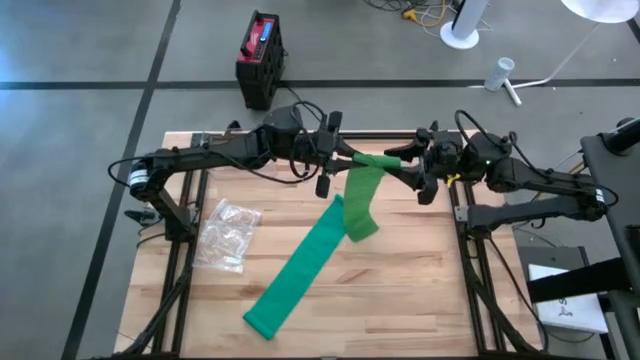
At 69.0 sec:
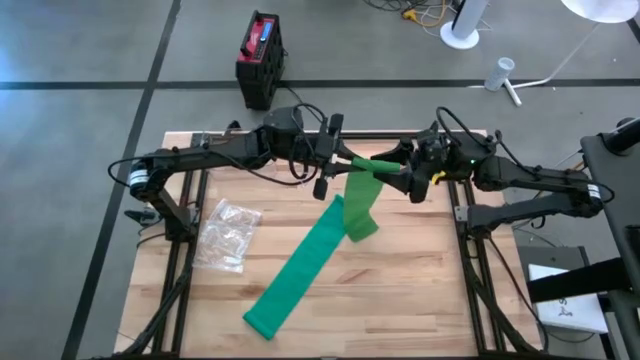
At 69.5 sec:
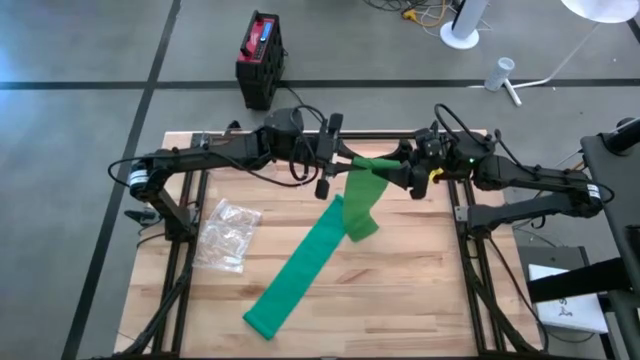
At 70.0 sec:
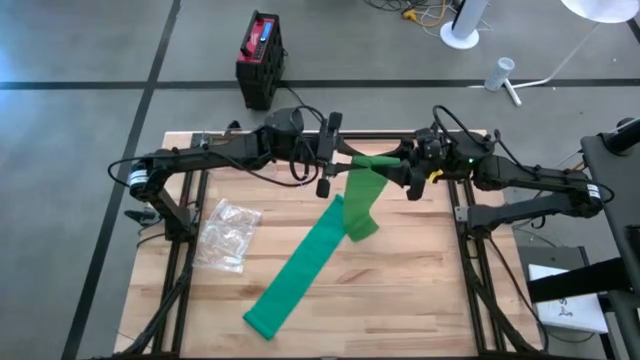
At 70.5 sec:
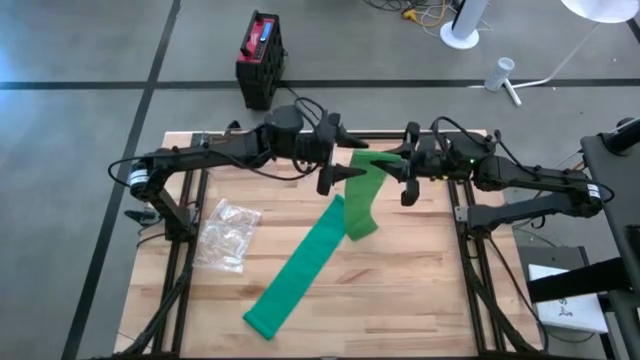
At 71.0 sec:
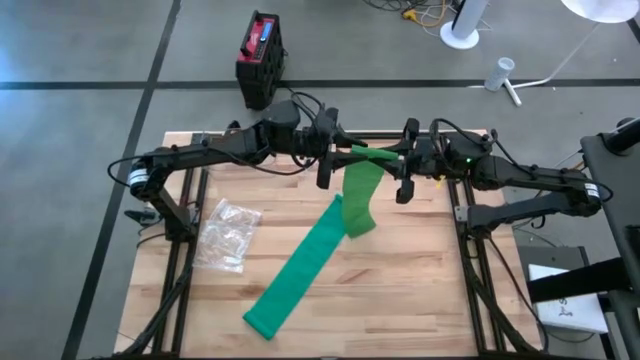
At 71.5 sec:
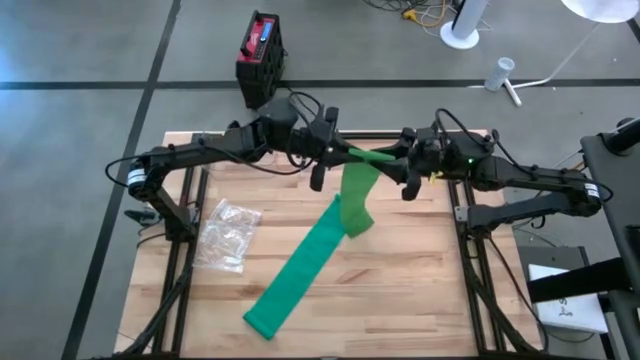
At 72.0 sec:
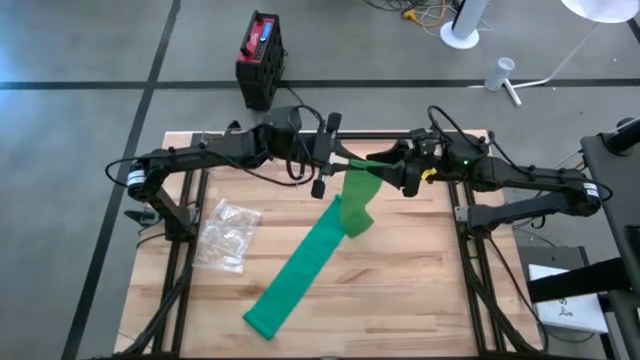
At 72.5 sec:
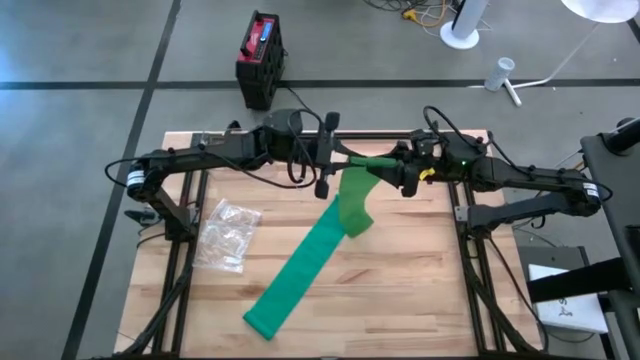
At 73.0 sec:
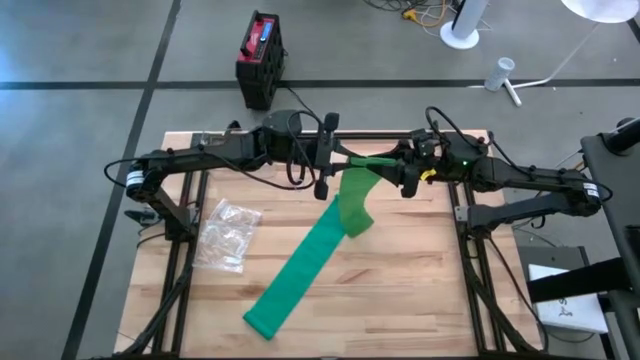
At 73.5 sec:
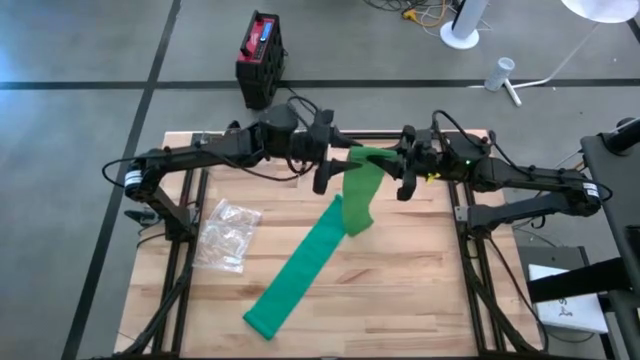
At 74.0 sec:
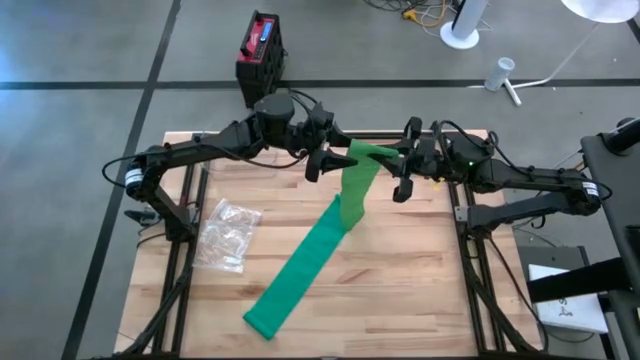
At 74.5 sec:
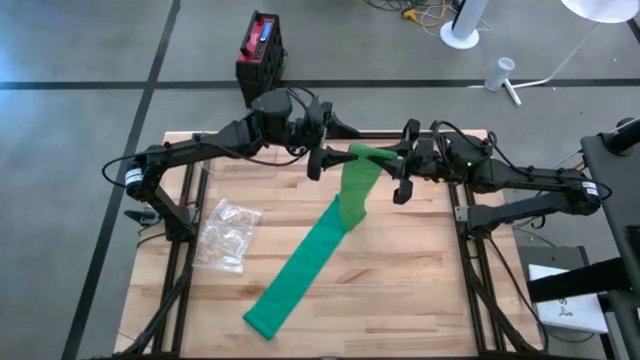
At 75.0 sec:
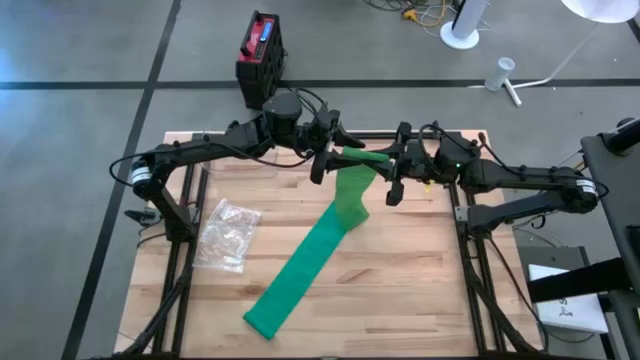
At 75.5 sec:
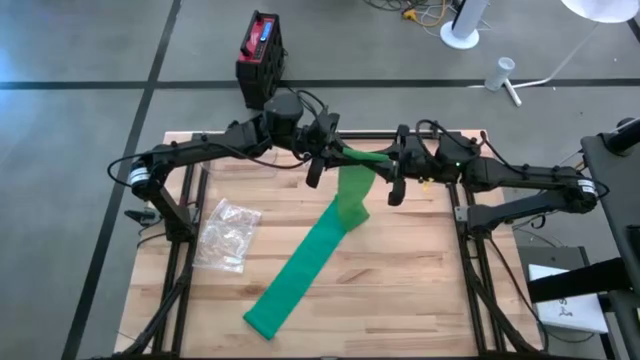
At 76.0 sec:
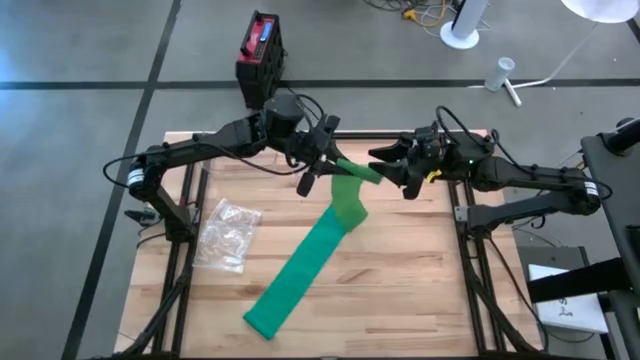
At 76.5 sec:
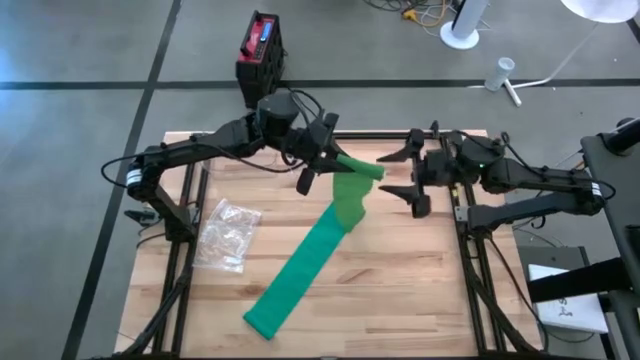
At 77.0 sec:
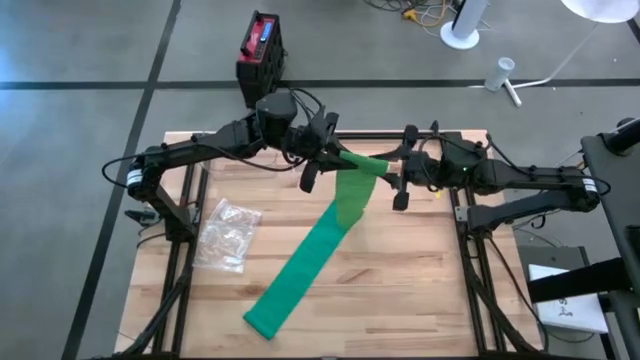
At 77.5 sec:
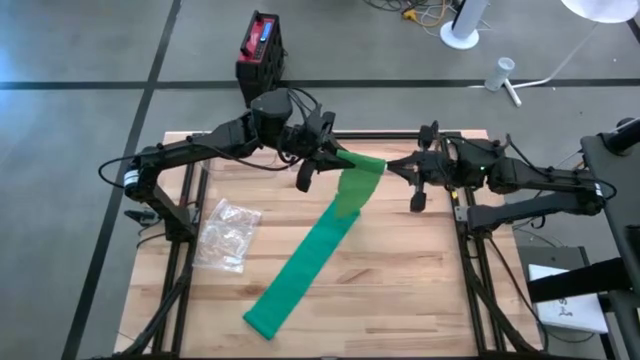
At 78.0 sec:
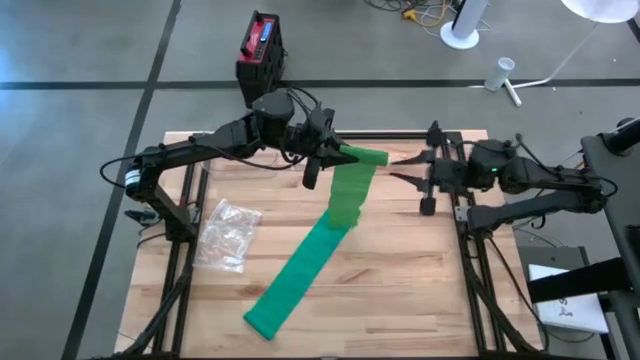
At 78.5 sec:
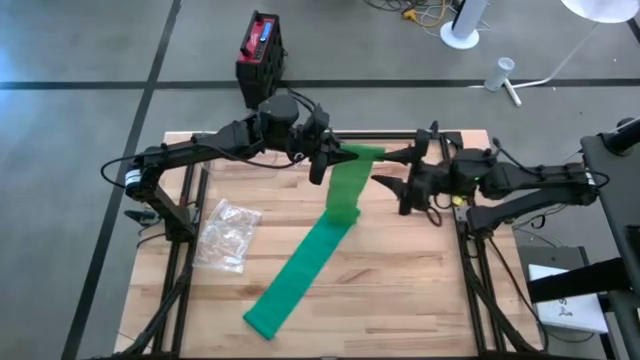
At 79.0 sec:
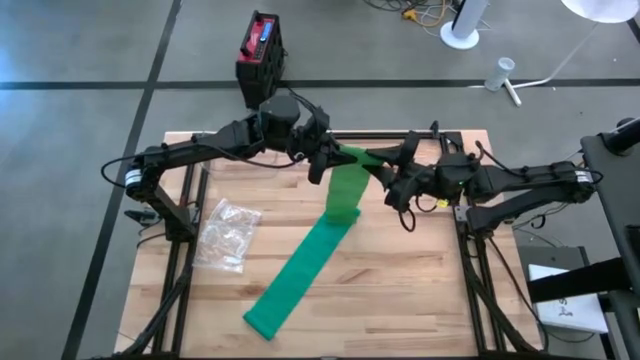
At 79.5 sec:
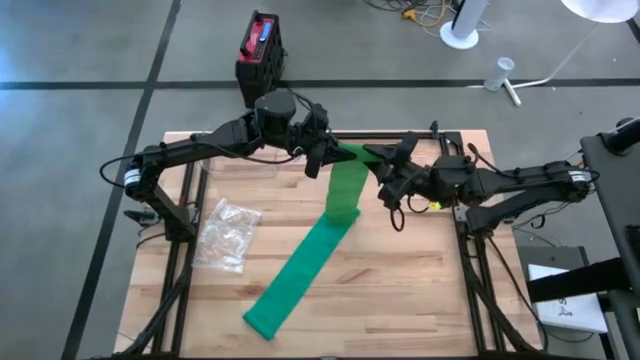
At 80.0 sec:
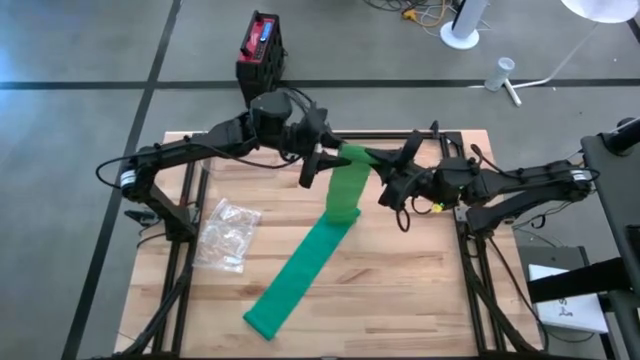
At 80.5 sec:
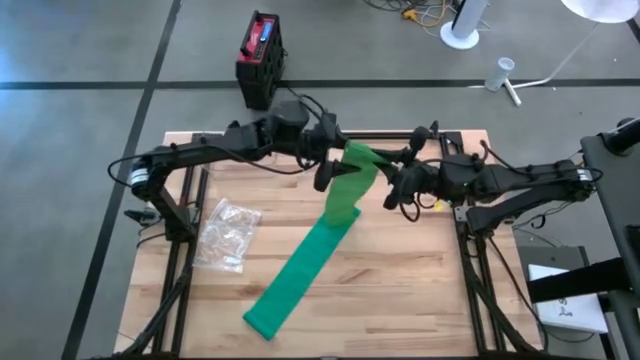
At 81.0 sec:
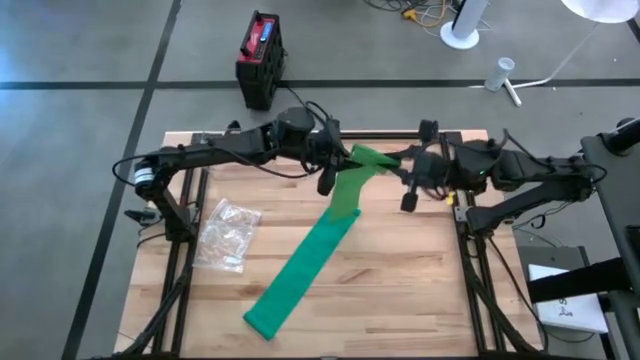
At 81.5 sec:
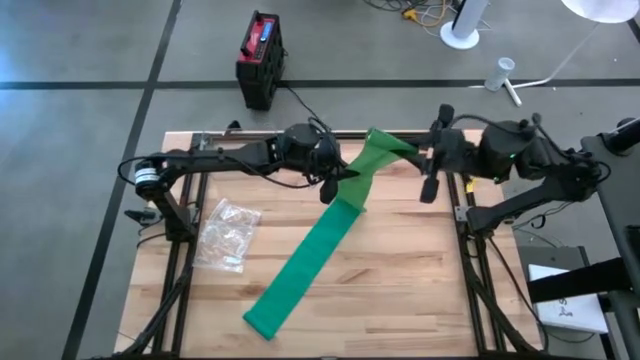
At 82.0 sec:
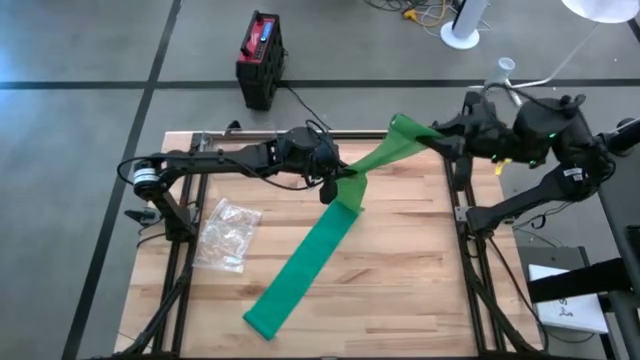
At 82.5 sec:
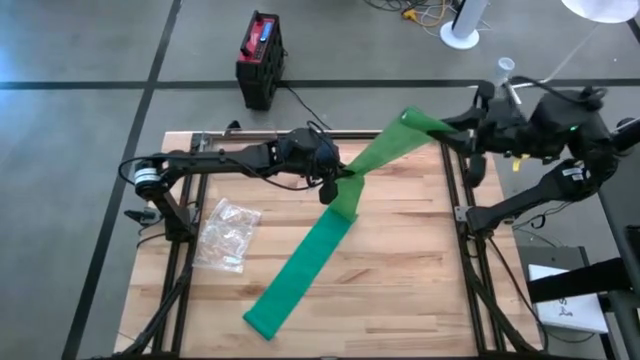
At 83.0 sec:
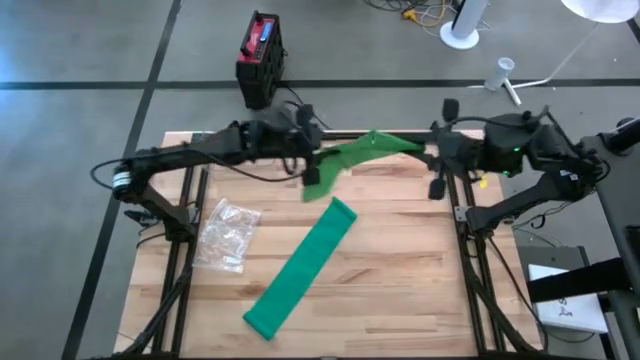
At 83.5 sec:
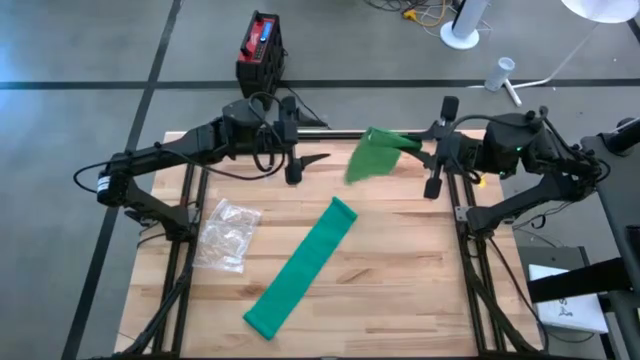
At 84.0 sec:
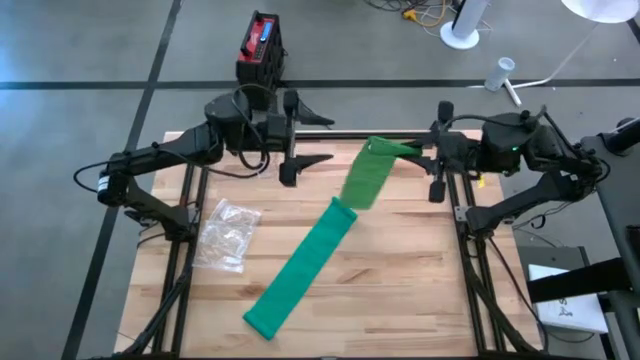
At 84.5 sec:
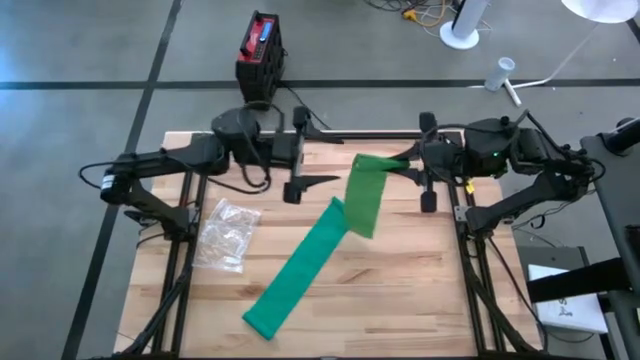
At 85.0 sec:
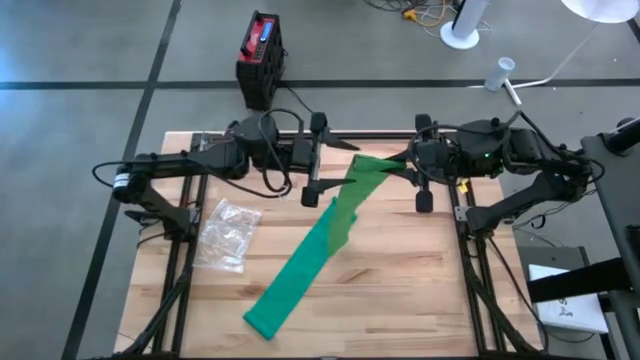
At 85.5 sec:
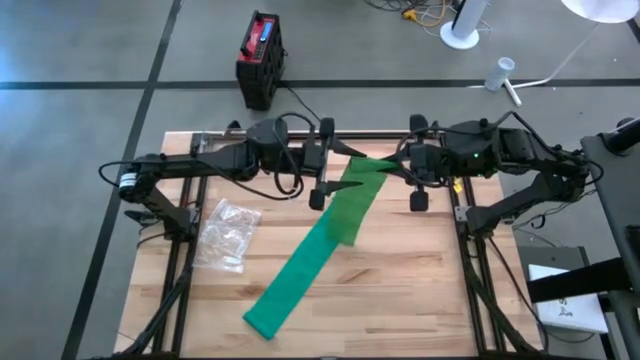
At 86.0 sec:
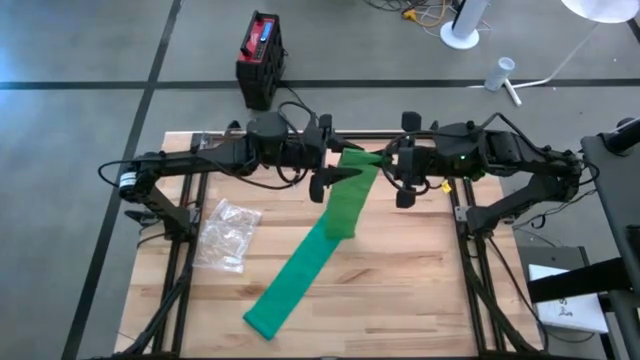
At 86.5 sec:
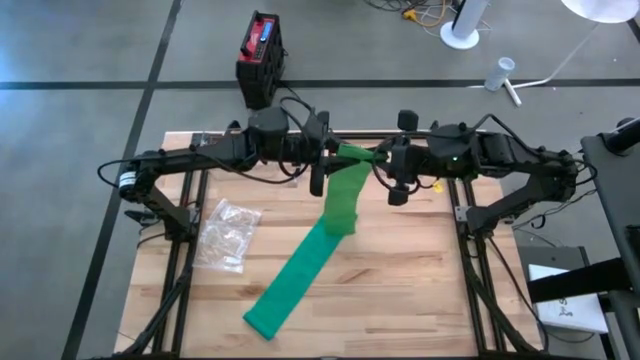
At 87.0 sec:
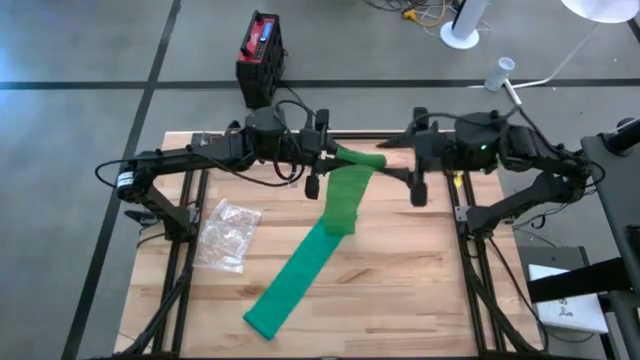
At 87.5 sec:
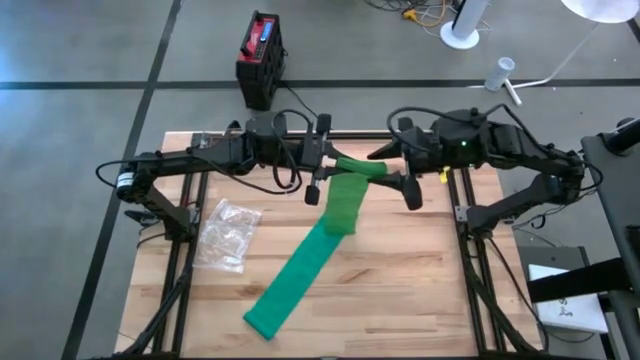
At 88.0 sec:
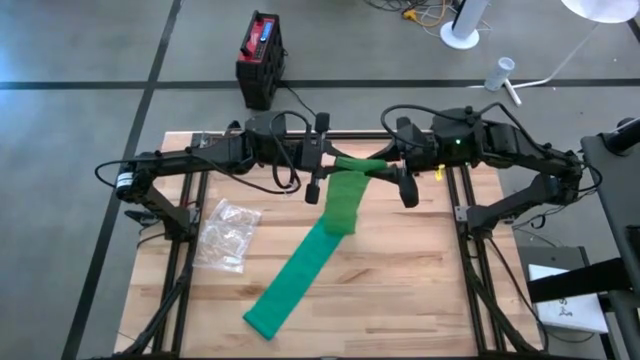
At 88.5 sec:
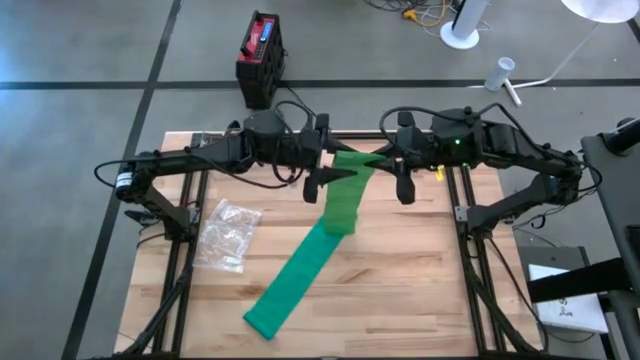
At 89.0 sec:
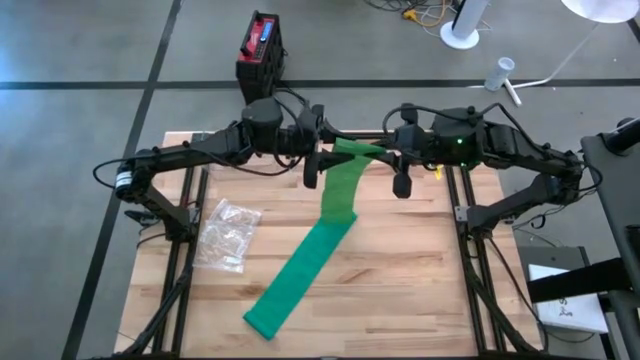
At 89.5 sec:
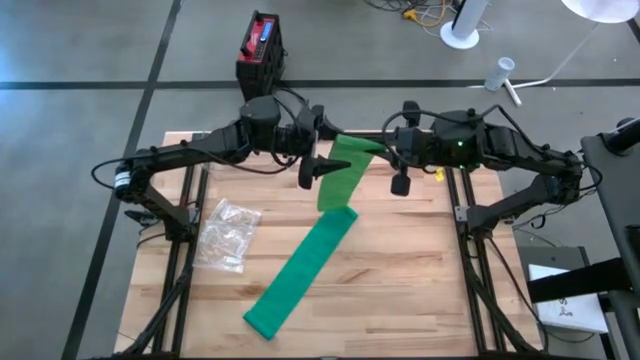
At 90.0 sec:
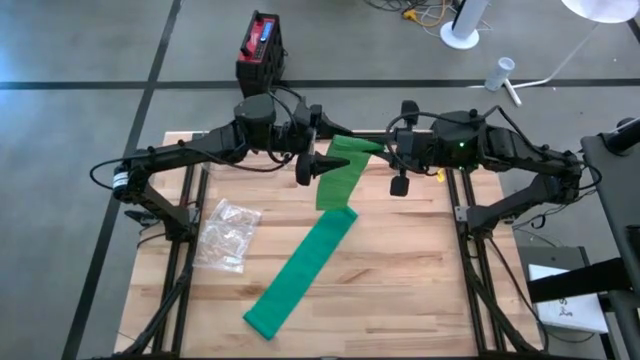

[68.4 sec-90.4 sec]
Task: Roll bandage
Roll the green bandage
